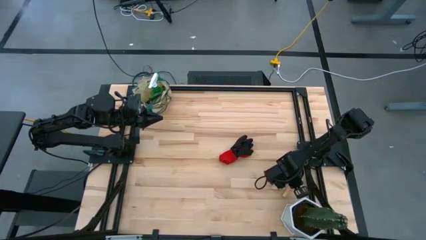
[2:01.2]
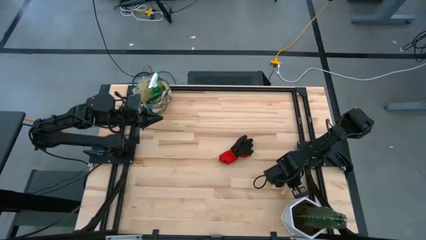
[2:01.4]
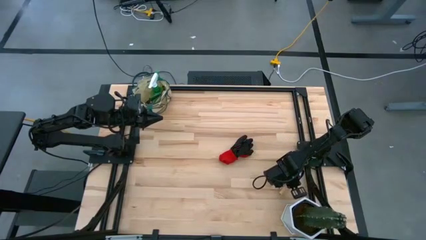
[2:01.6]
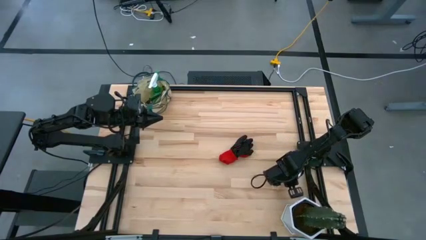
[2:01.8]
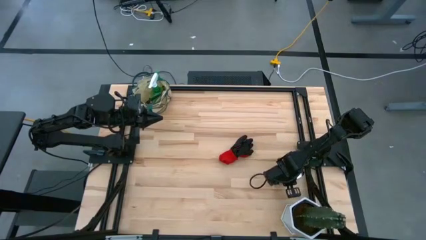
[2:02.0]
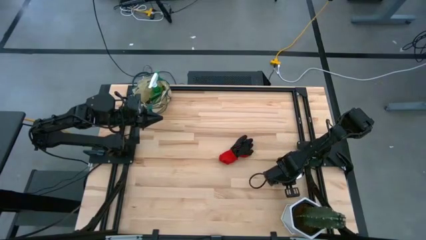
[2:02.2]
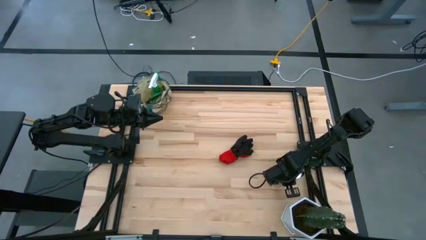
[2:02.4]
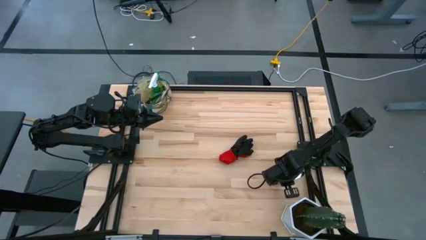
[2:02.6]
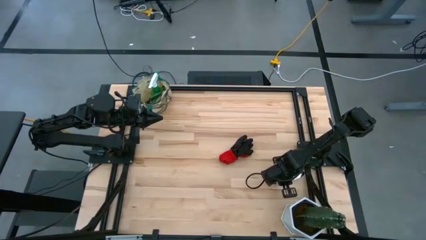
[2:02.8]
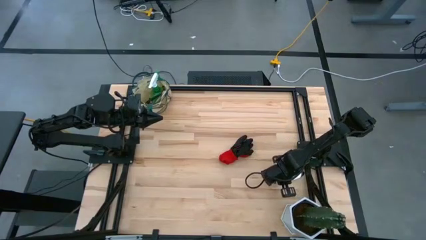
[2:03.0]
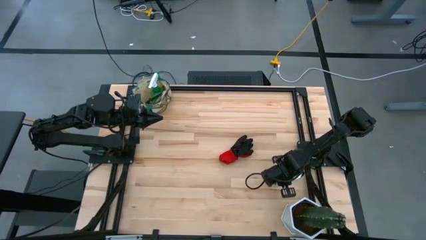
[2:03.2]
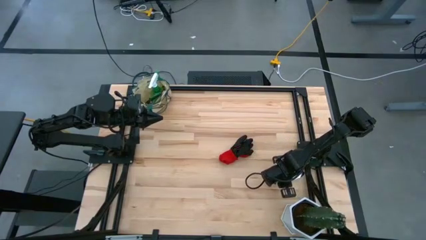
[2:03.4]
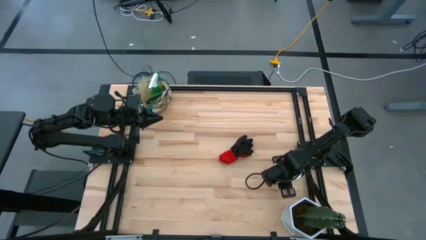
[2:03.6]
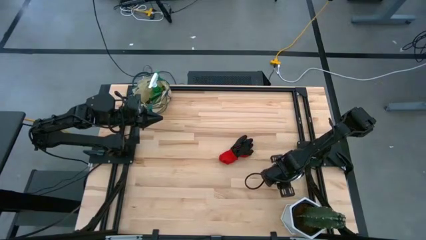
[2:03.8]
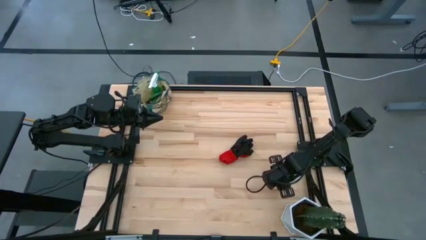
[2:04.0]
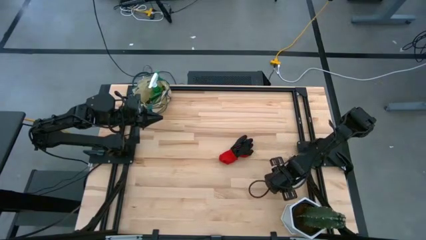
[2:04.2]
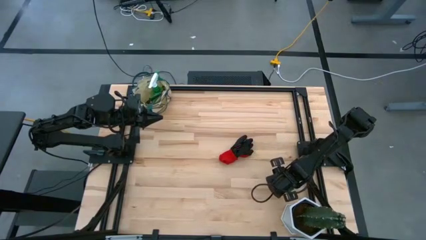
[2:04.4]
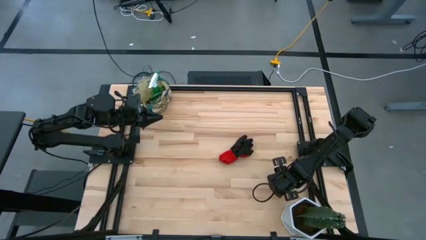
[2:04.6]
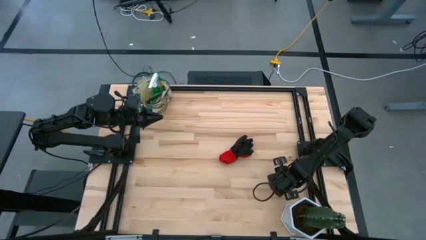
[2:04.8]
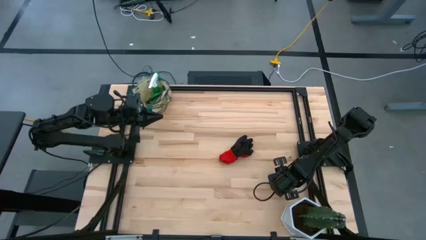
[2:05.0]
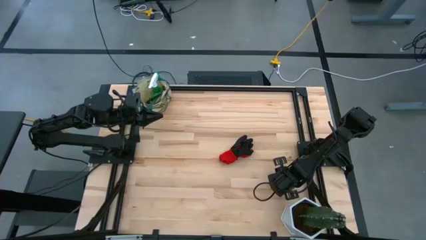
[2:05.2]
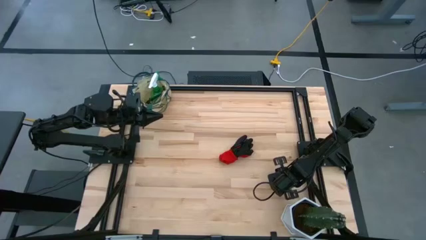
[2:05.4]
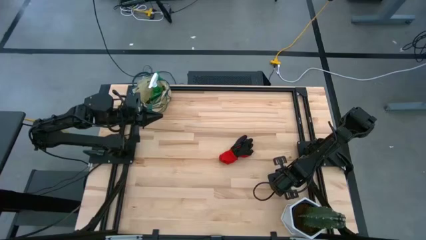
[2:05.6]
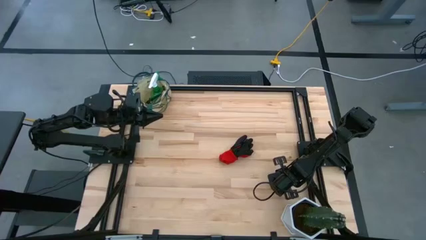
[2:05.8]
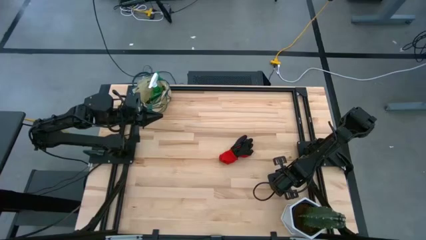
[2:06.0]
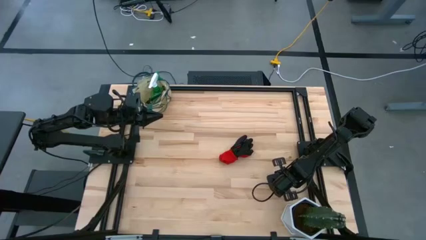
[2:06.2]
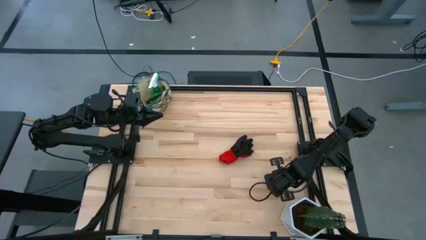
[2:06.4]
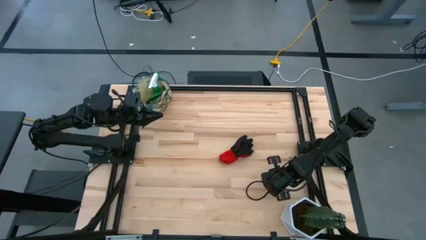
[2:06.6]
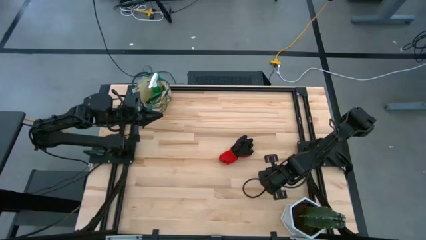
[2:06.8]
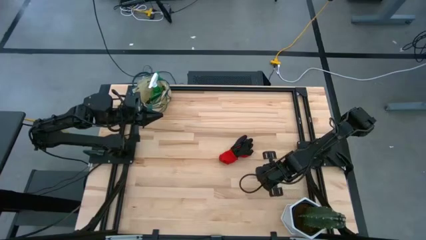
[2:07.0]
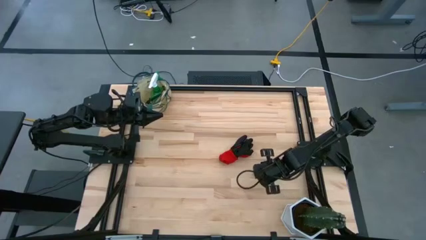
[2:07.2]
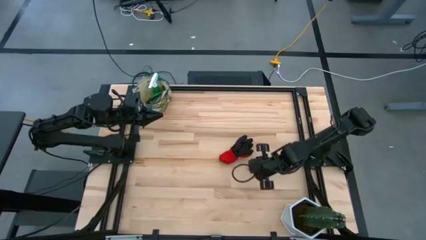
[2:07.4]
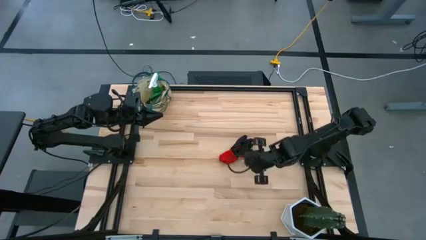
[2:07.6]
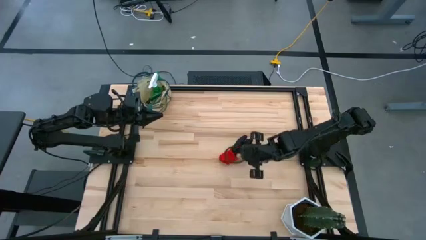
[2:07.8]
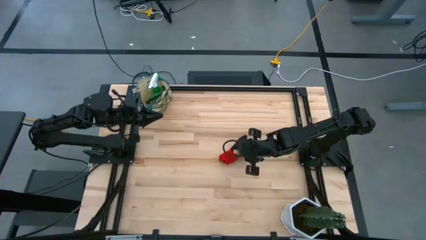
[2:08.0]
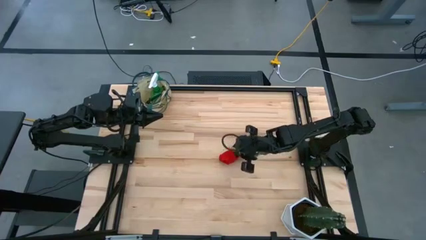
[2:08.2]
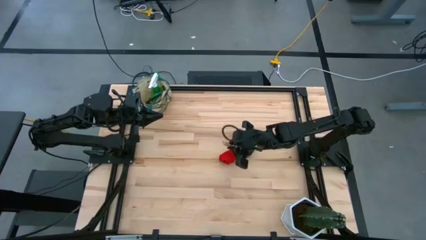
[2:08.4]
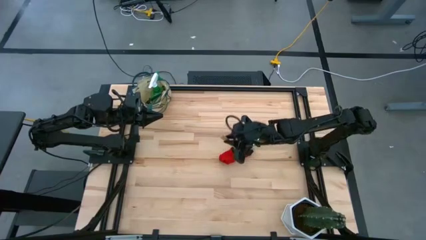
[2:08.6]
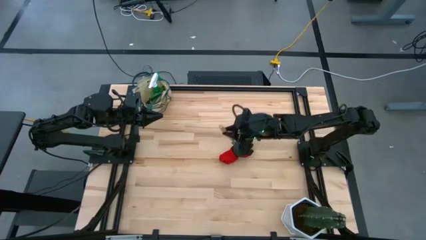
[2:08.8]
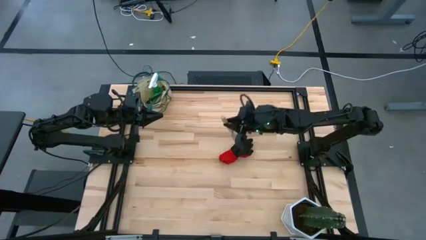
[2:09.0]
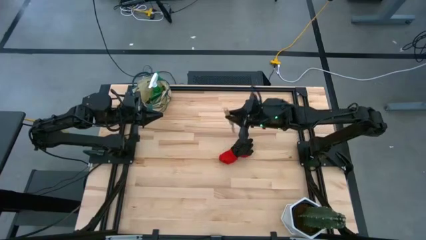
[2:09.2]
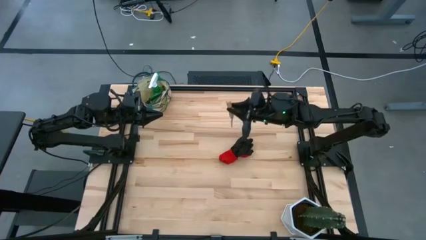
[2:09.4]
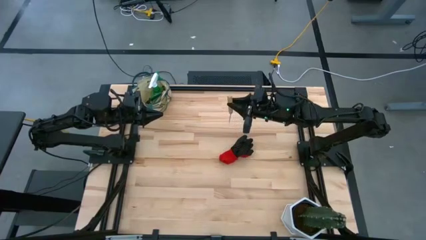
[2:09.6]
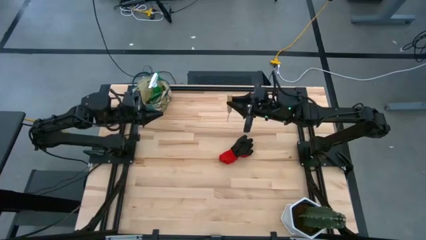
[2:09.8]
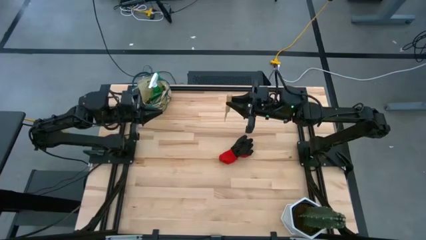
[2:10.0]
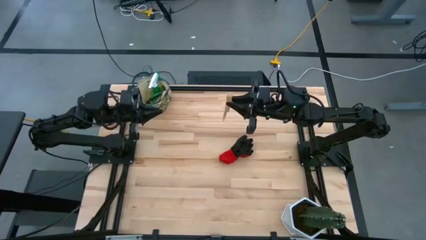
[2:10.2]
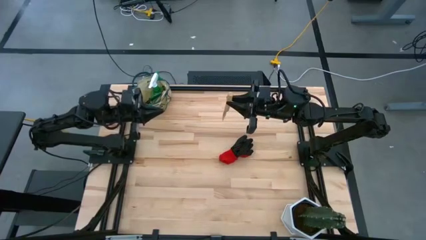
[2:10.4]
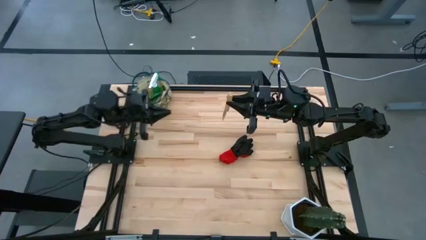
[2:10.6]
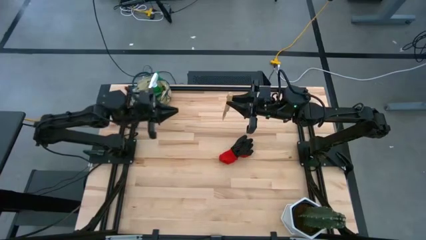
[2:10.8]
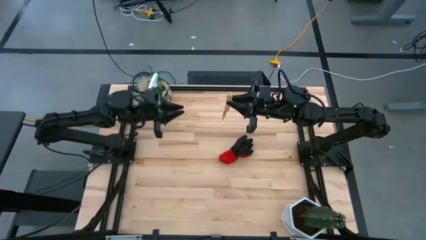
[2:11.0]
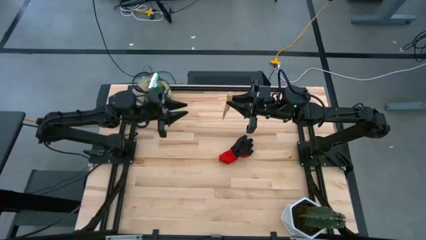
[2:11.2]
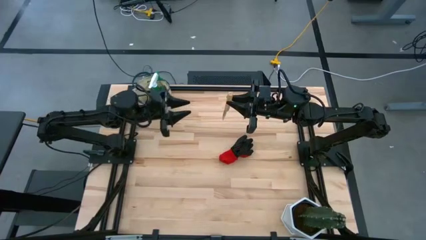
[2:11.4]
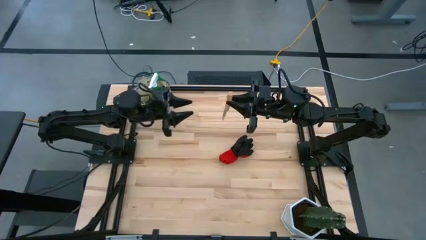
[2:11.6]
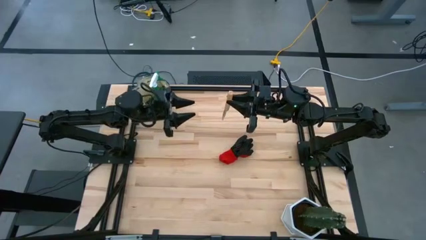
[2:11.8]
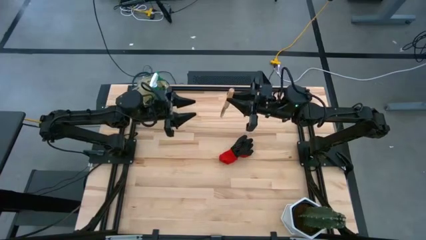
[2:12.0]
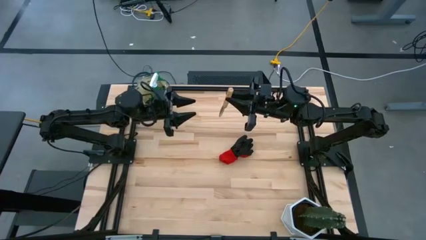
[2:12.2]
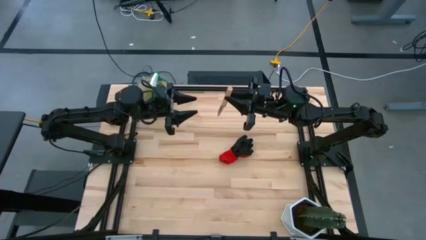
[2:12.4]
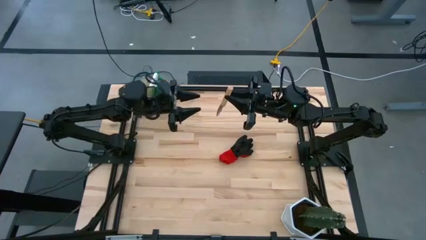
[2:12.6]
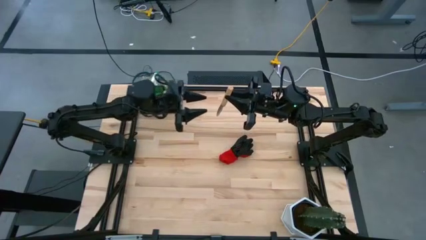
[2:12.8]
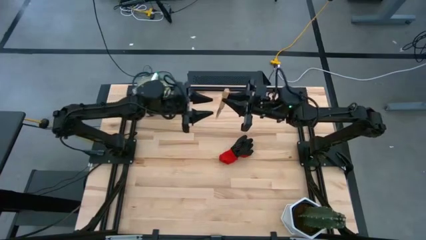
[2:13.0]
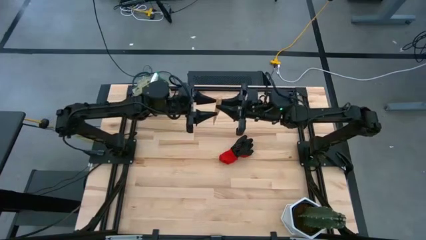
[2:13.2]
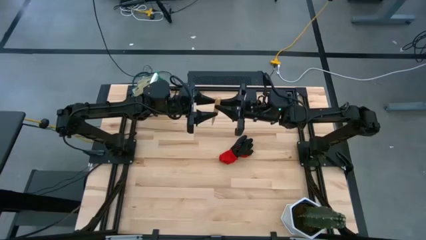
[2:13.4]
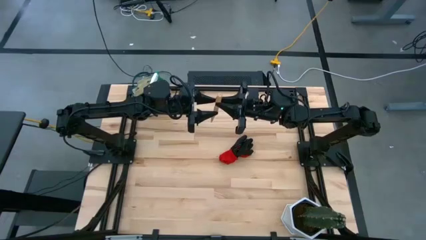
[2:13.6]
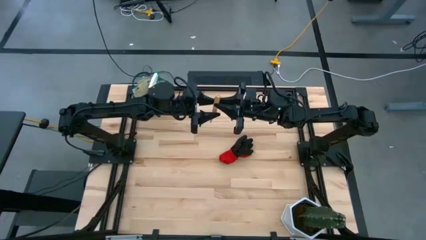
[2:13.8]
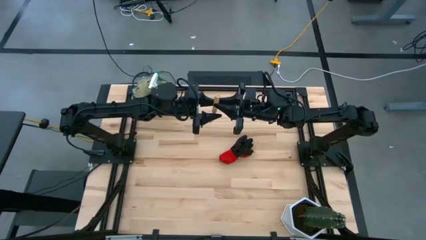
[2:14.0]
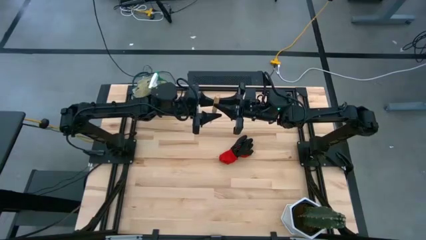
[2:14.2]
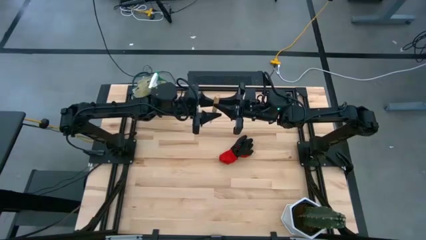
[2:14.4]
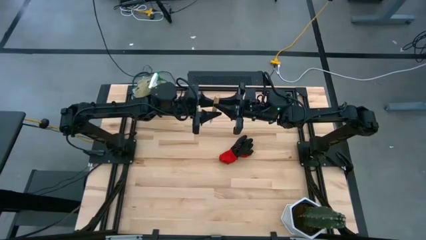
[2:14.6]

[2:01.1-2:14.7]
Task: Pick & Place Garden tools in Gardening bag
Put the trowel into the gardening bag

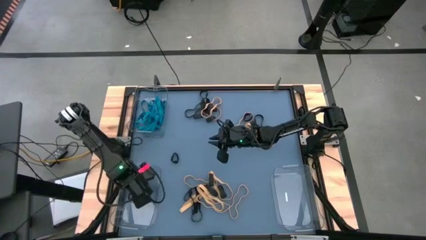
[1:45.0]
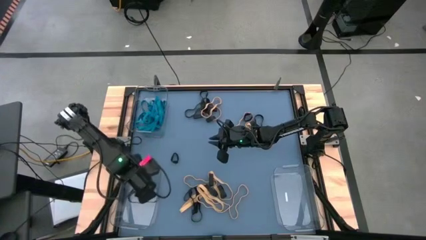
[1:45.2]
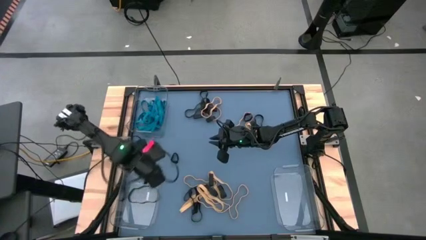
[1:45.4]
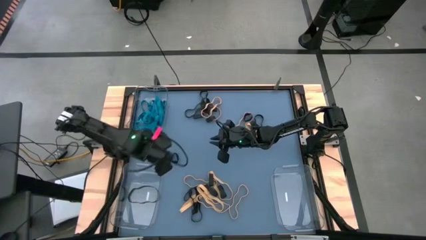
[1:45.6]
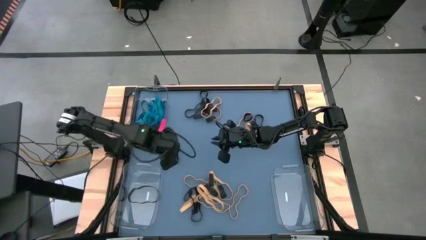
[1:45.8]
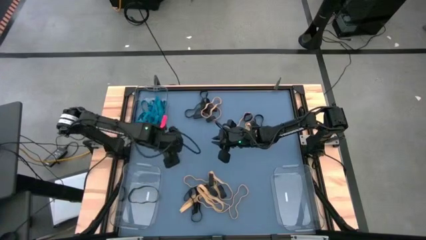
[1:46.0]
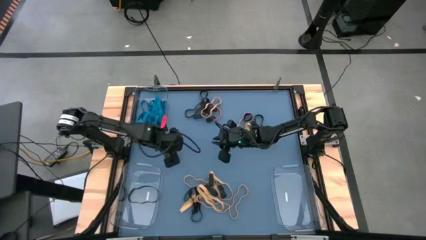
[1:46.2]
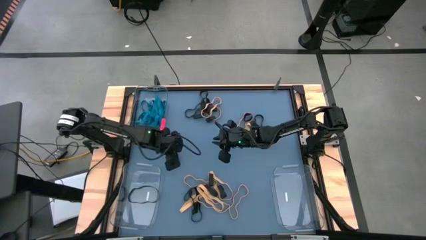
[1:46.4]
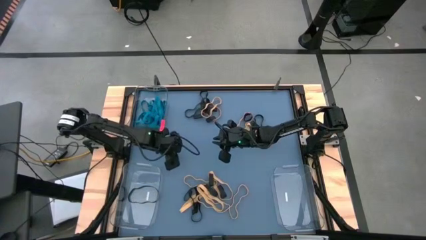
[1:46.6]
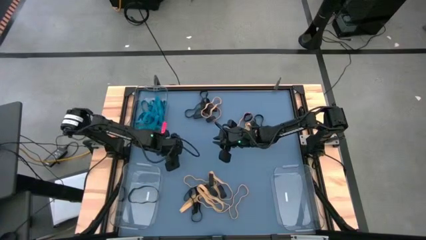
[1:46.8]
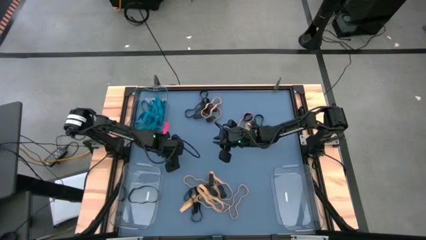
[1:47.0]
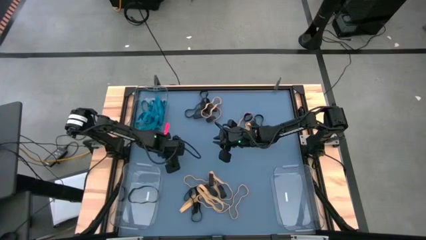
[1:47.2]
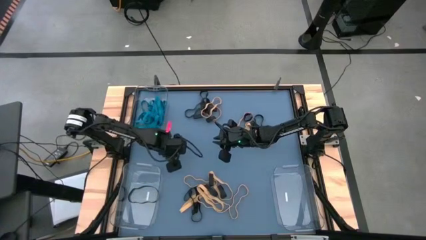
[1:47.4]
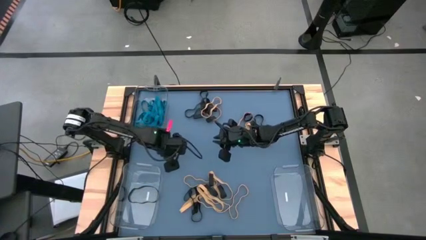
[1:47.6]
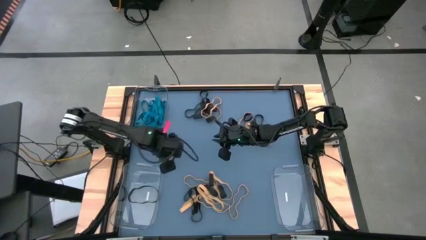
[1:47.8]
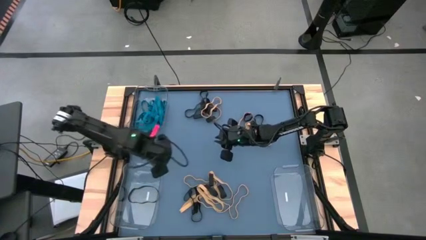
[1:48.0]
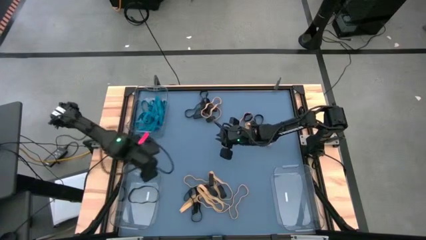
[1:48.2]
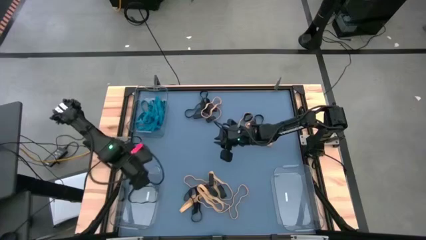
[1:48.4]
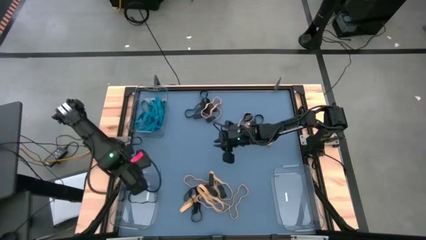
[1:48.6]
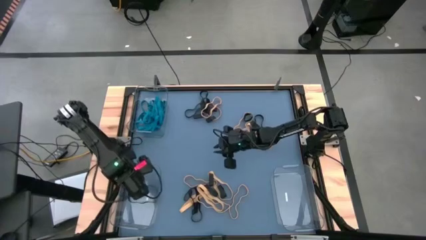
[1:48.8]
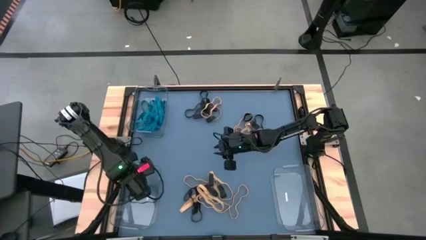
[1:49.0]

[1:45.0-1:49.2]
Task: Sort rubber bands into baskets
Put the black rubber band into the bottom left transparent bin
